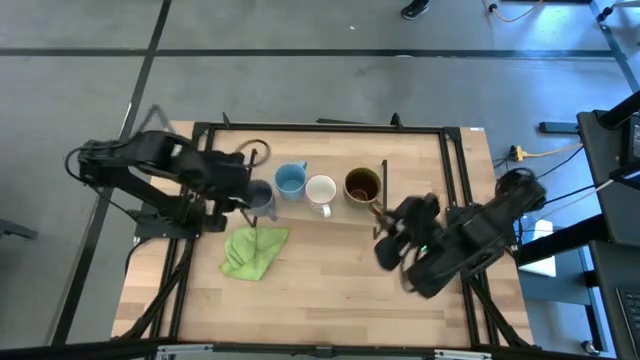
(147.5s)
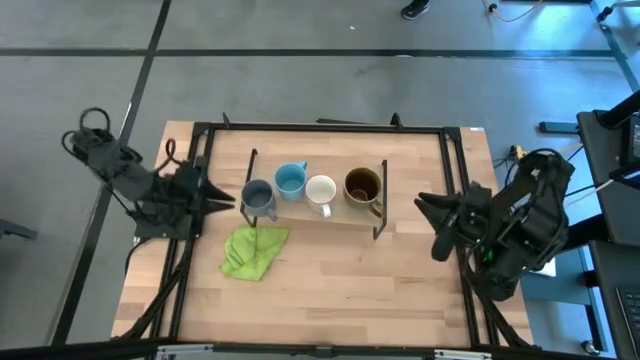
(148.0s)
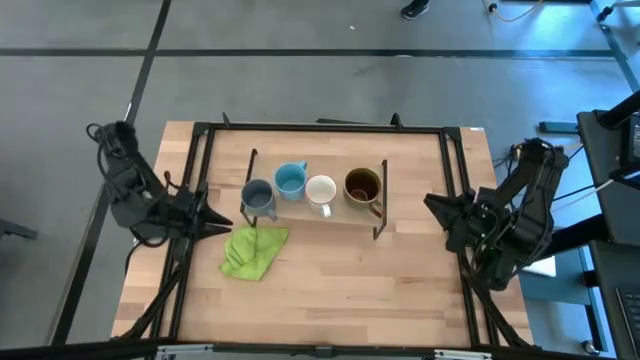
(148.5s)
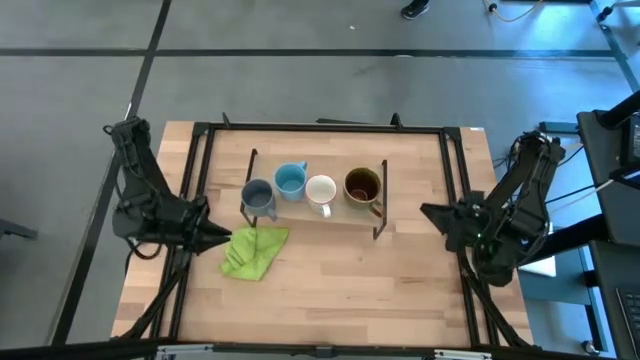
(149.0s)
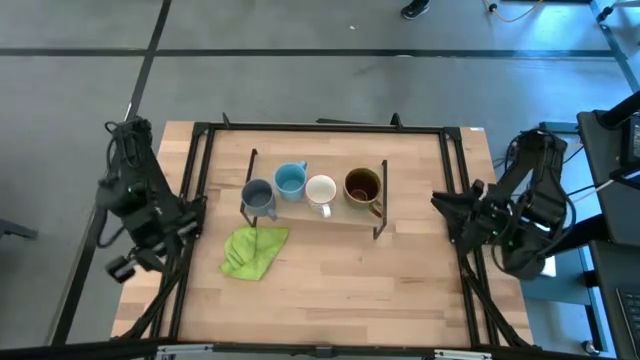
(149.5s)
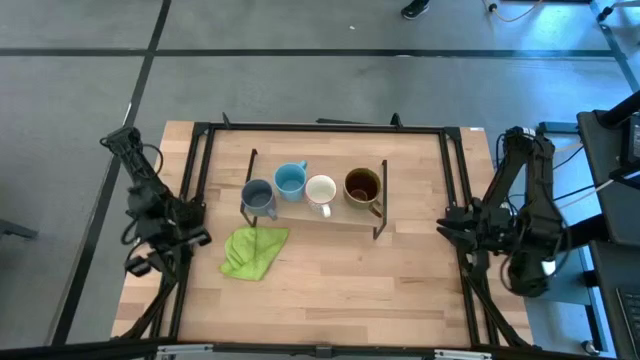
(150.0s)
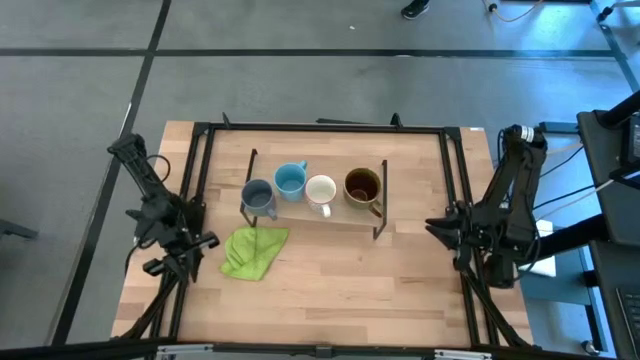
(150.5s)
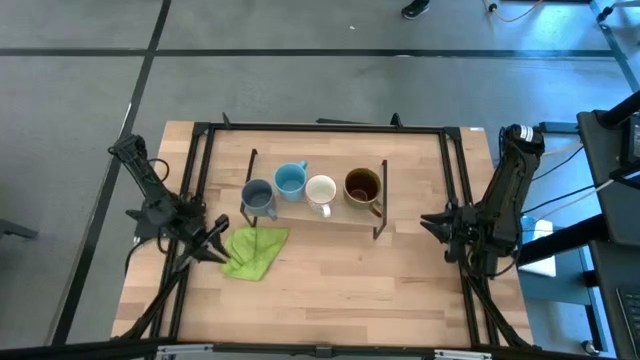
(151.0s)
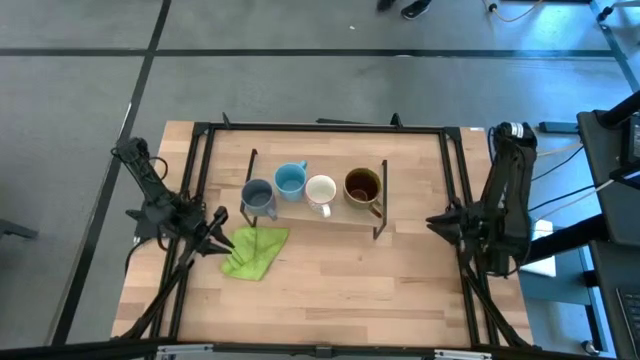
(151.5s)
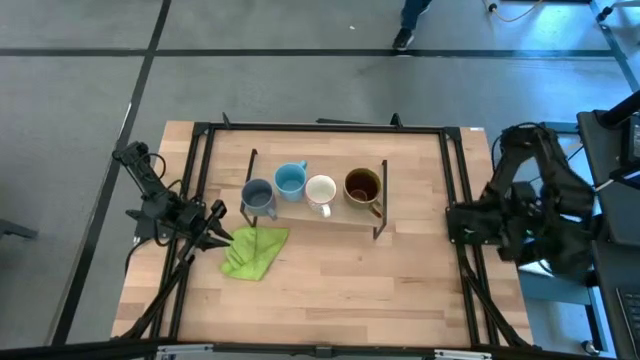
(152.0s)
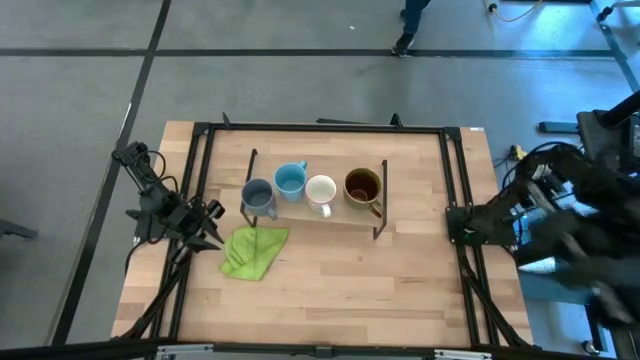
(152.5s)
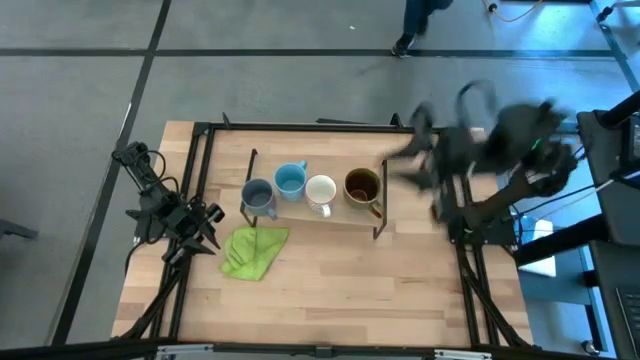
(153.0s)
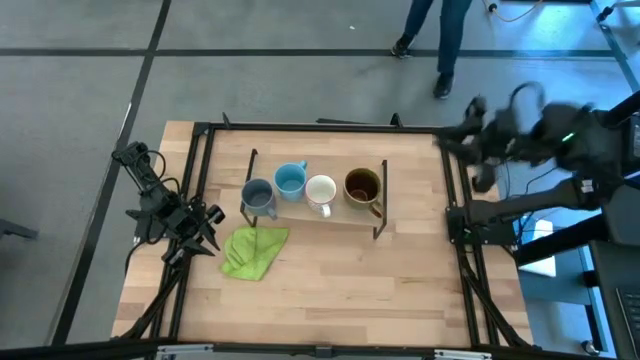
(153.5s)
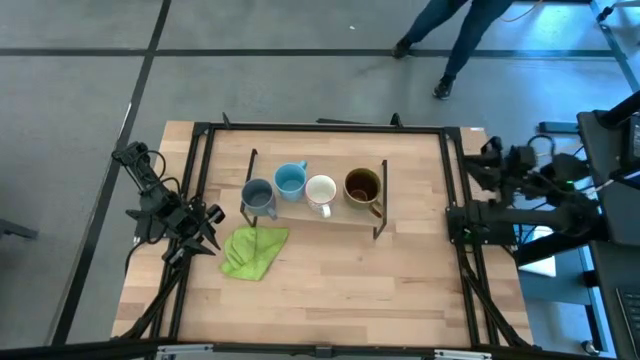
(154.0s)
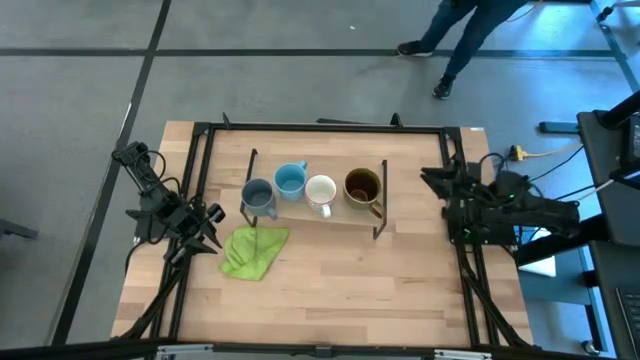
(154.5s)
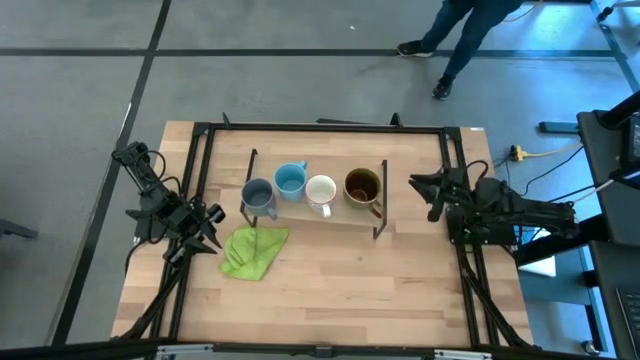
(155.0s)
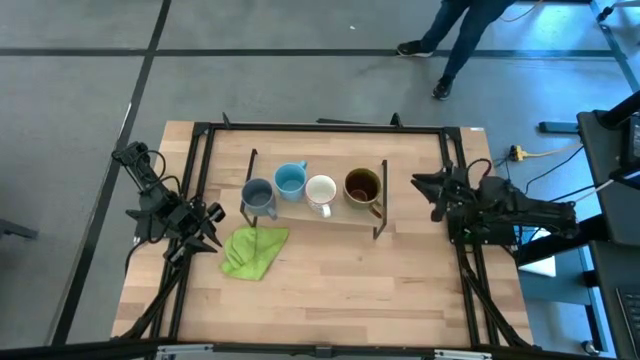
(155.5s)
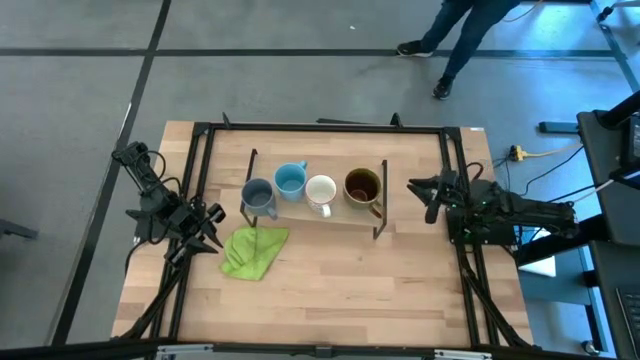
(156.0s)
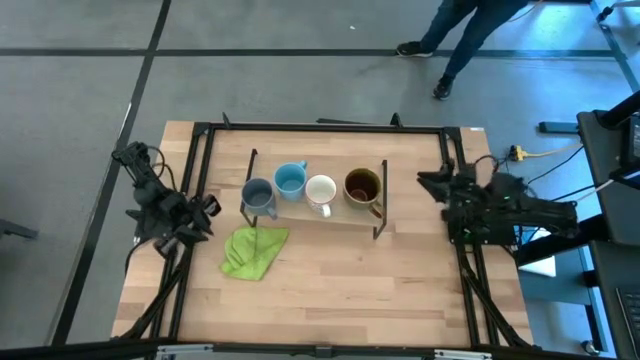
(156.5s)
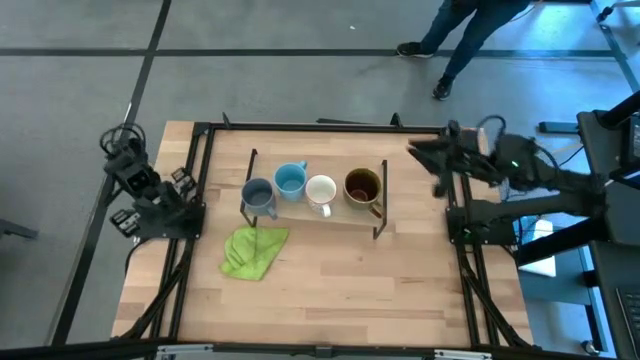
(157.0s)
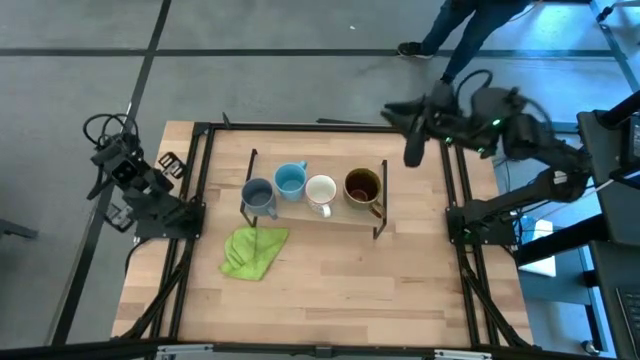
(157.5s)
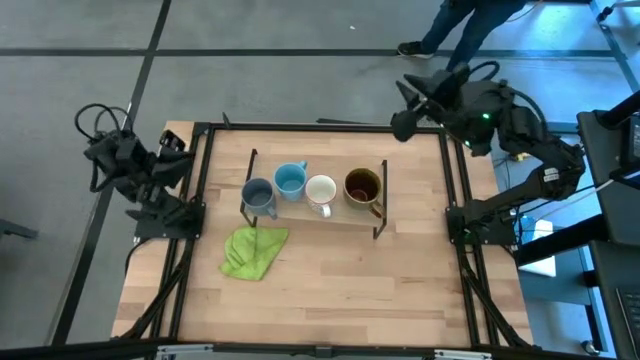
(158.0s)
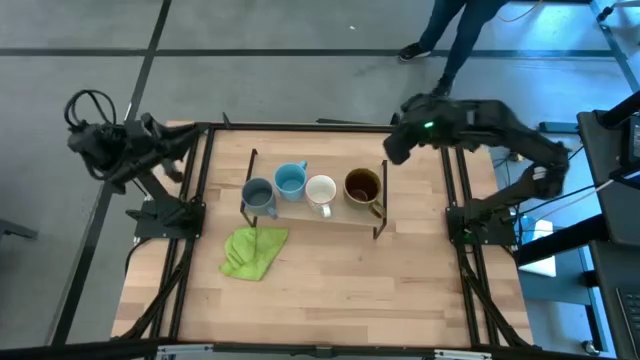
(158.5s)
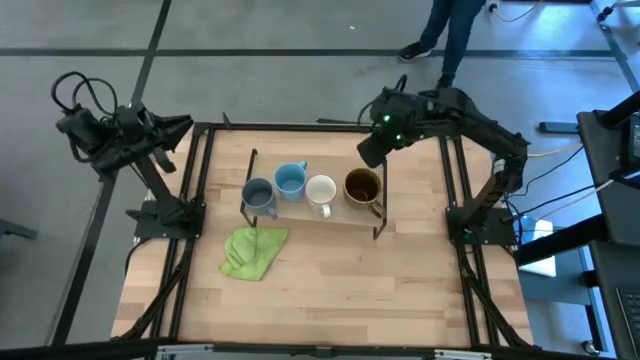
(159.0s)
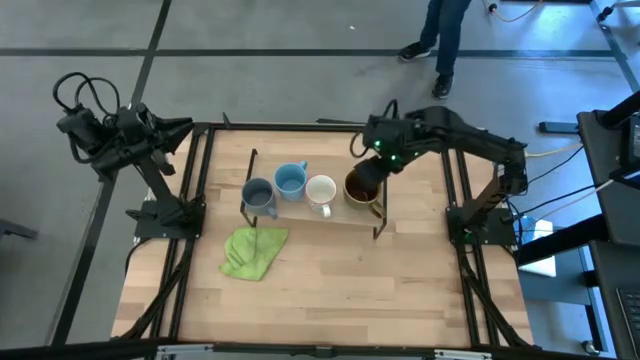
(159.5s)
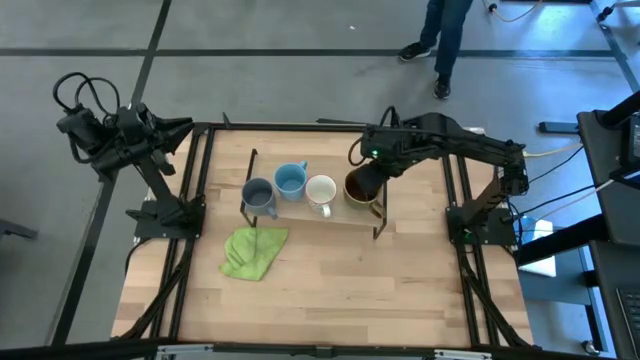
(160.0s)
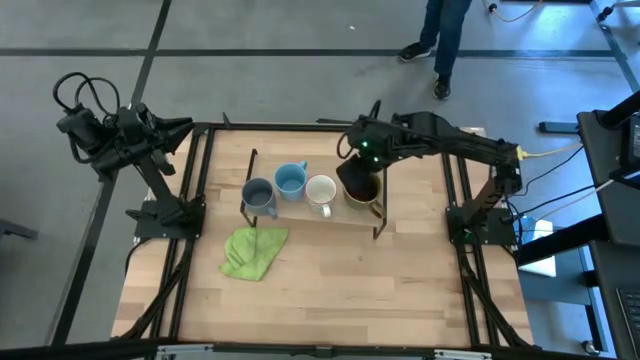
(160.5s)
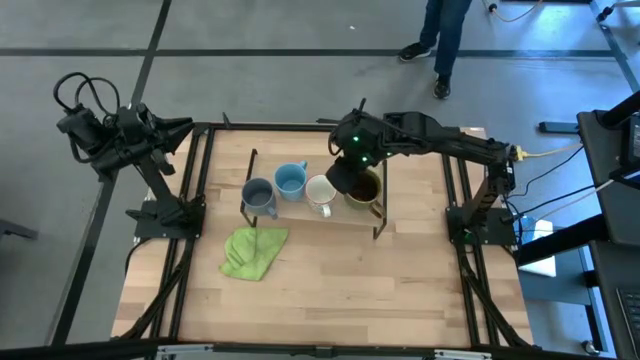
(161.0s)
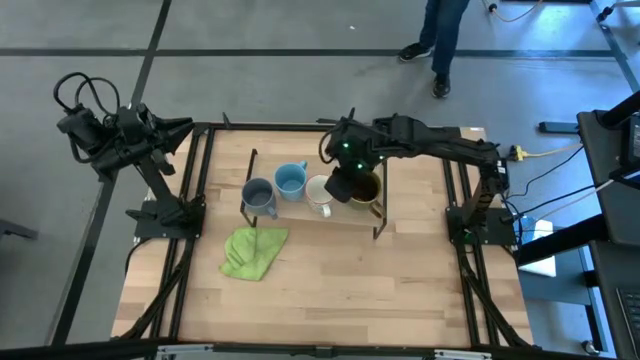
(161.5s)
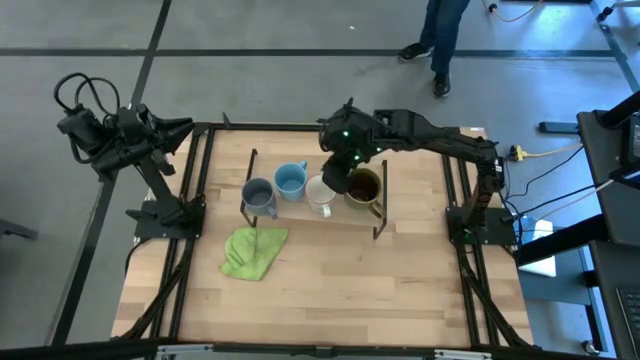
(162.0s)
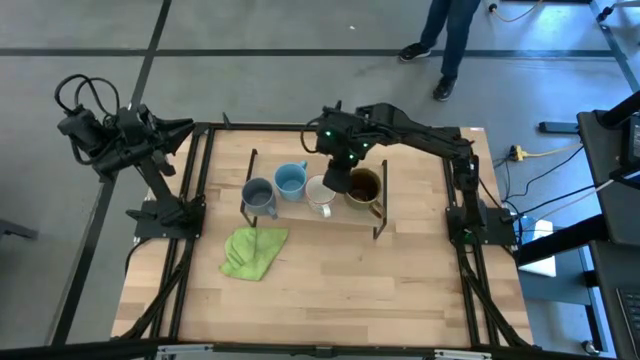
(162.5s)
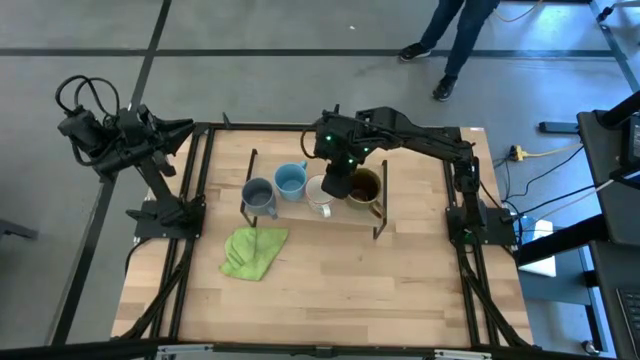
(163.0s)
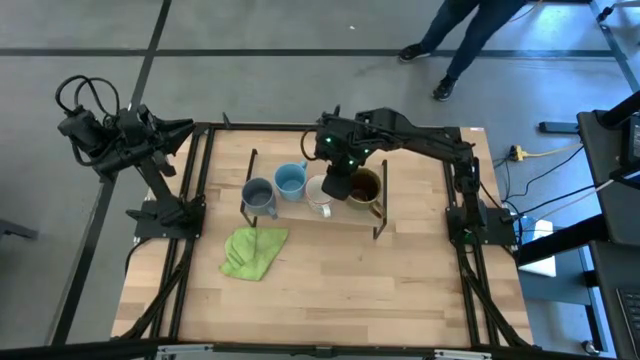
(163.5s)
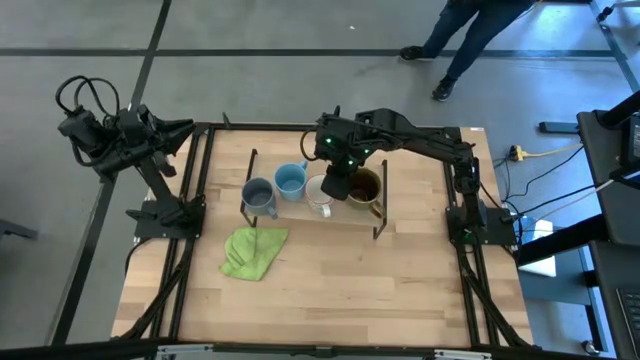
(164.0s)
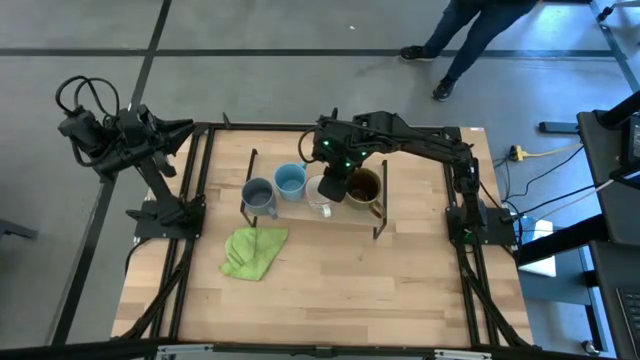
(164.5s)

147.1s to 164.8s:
Task: Stack small to large cups/mugs on shelf
Adjust the mugs on the shelf
